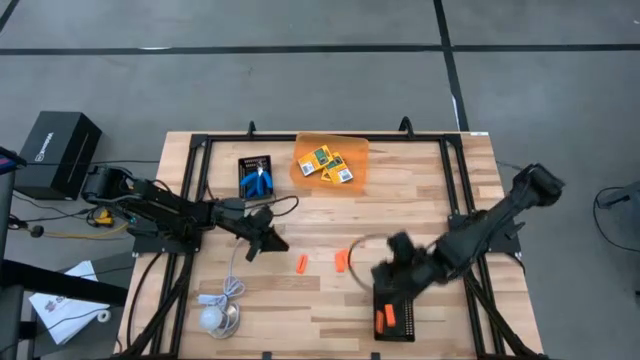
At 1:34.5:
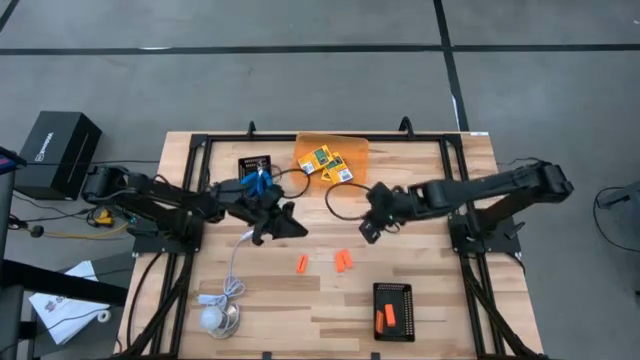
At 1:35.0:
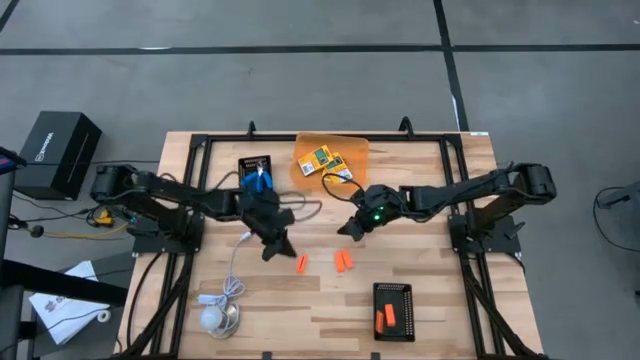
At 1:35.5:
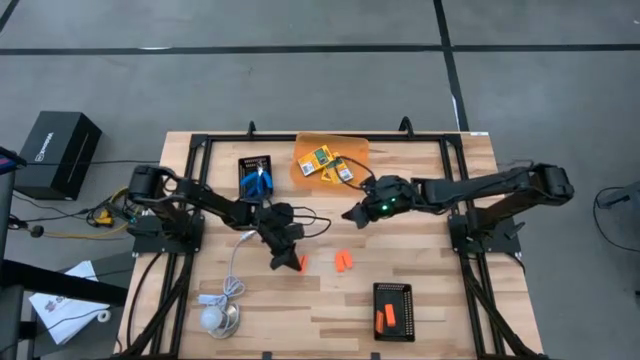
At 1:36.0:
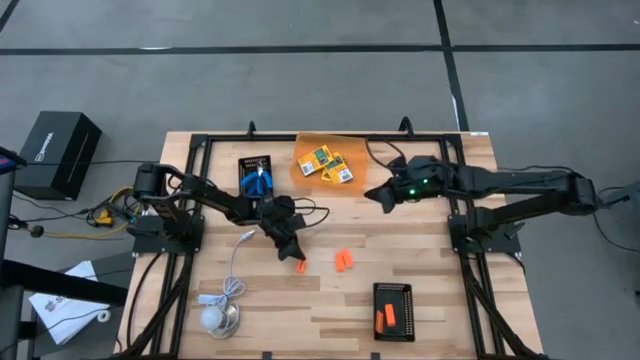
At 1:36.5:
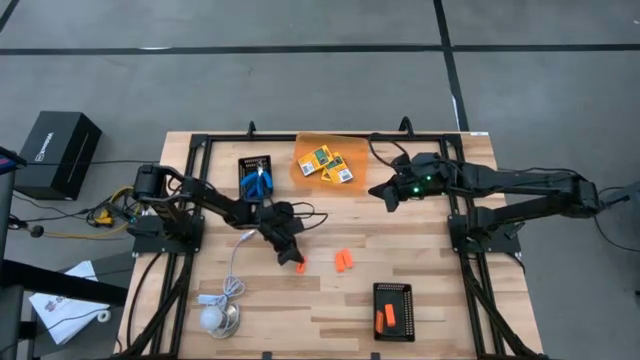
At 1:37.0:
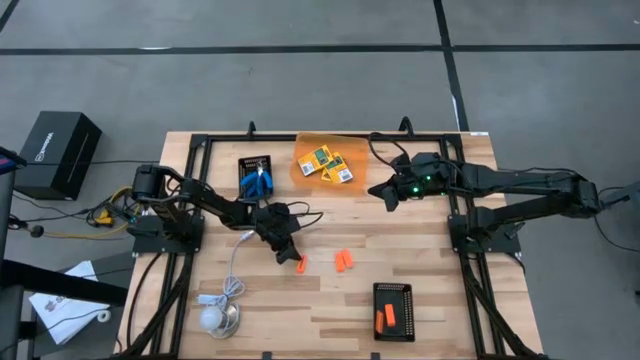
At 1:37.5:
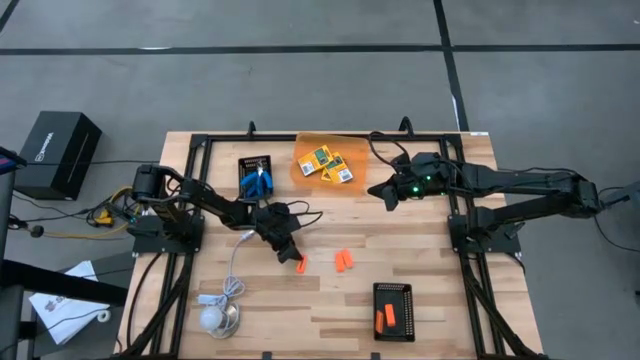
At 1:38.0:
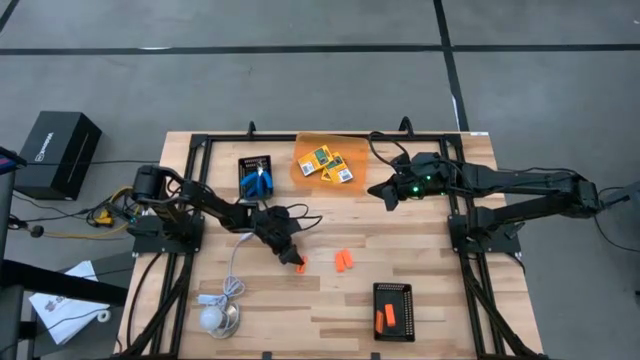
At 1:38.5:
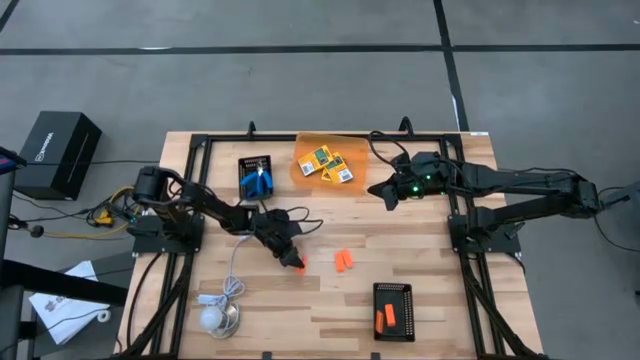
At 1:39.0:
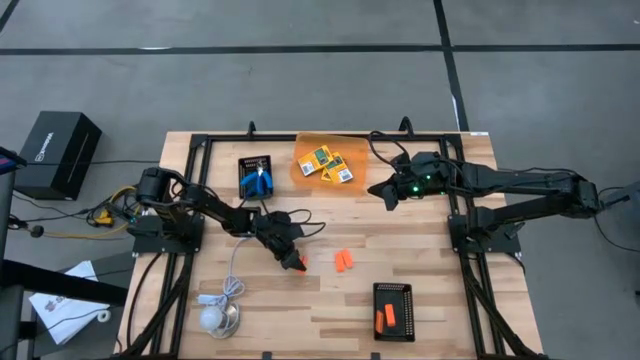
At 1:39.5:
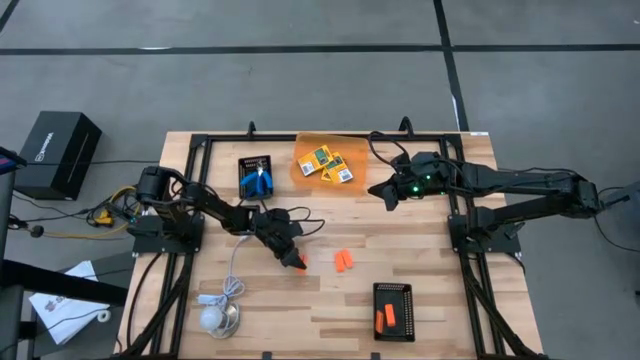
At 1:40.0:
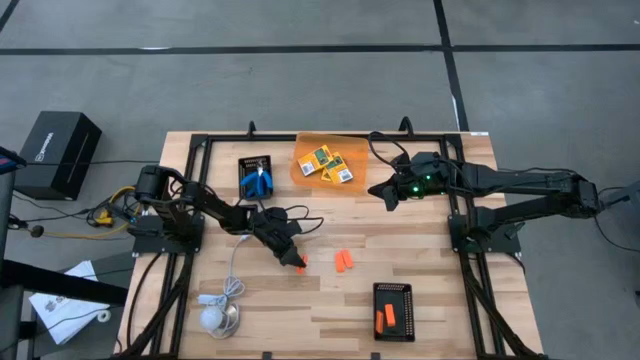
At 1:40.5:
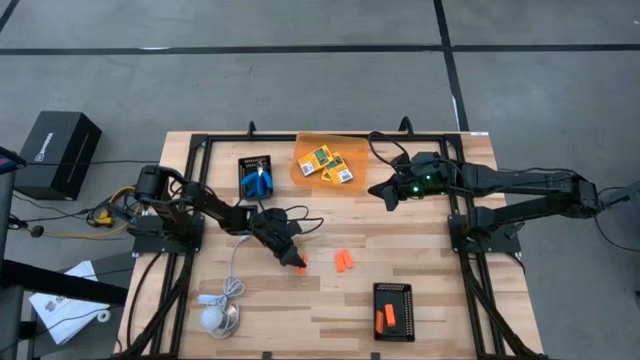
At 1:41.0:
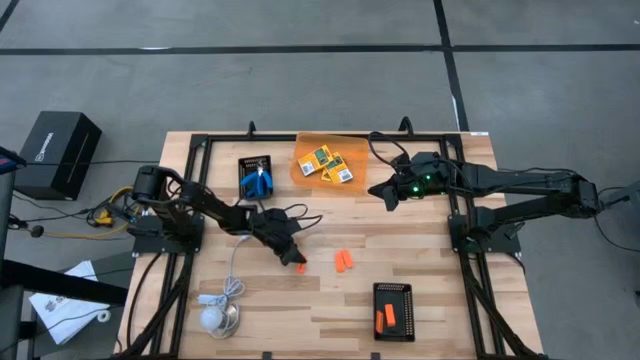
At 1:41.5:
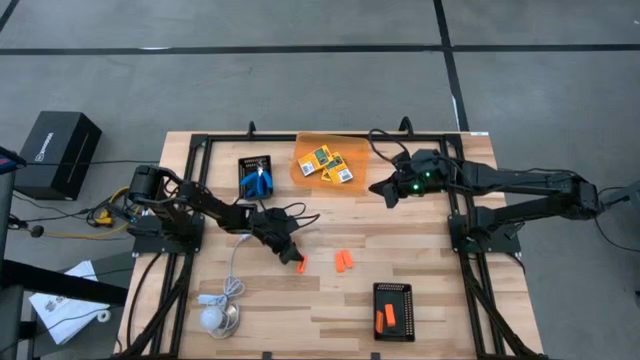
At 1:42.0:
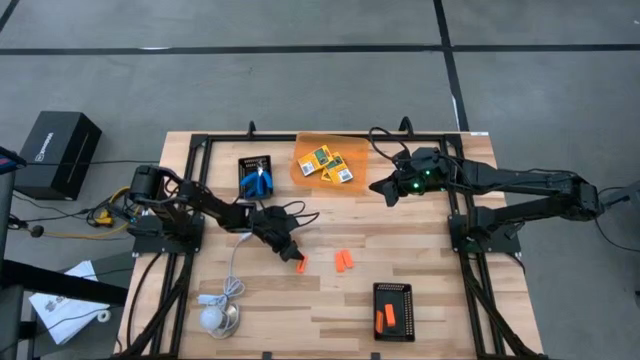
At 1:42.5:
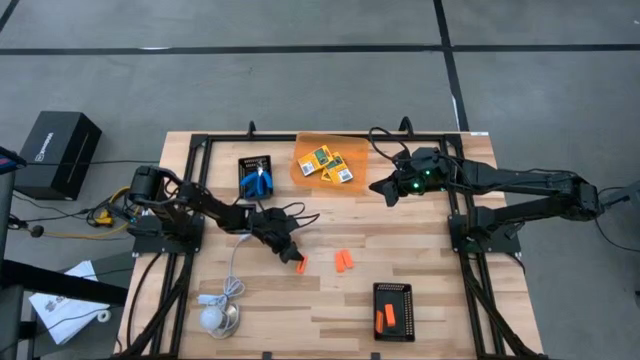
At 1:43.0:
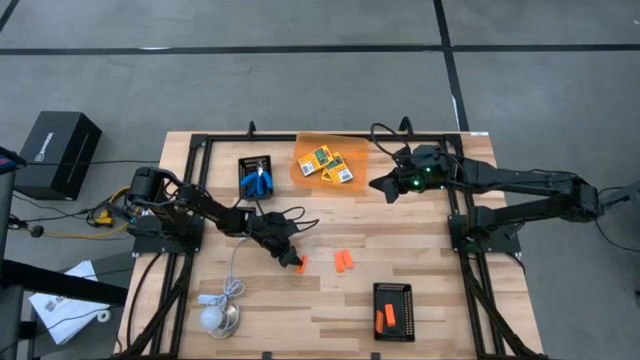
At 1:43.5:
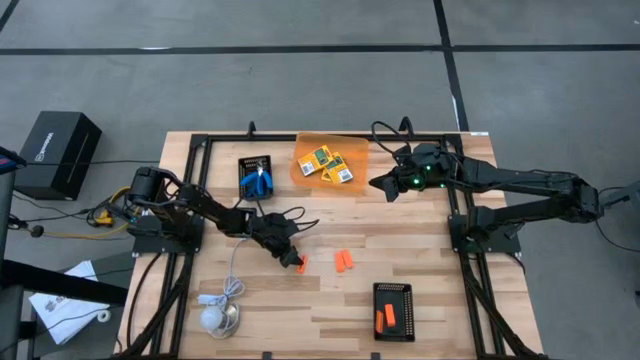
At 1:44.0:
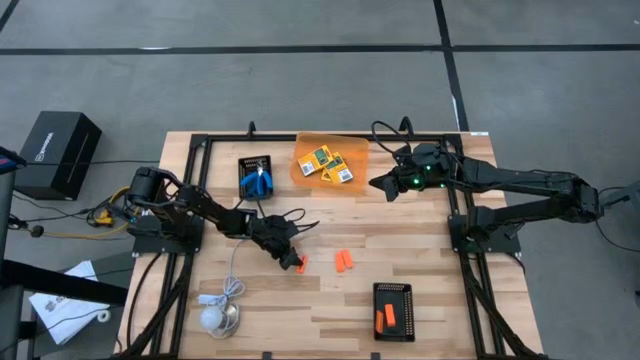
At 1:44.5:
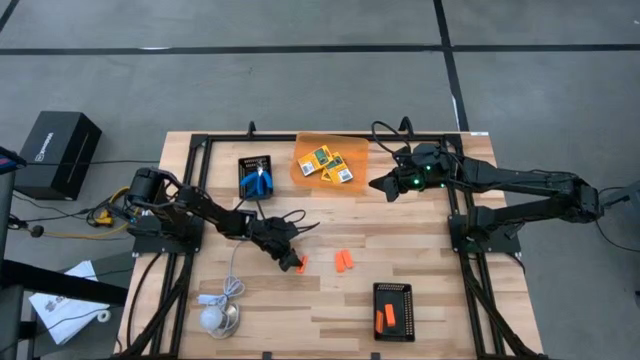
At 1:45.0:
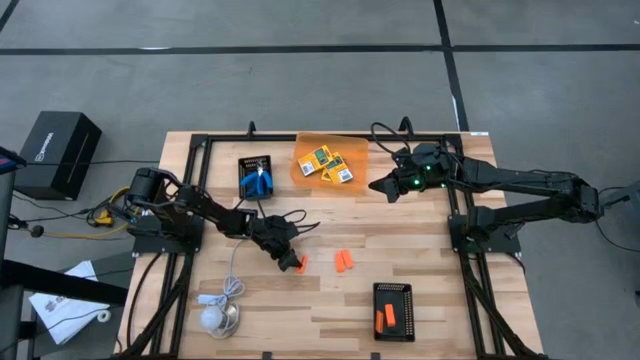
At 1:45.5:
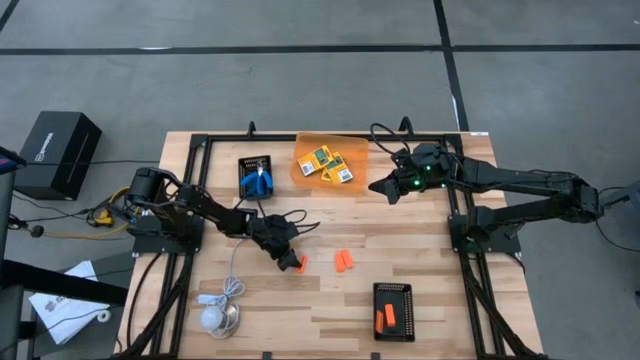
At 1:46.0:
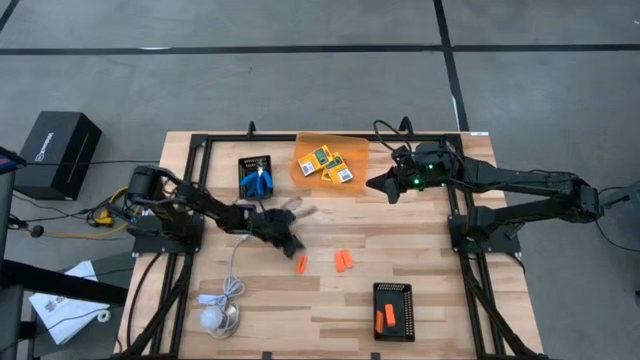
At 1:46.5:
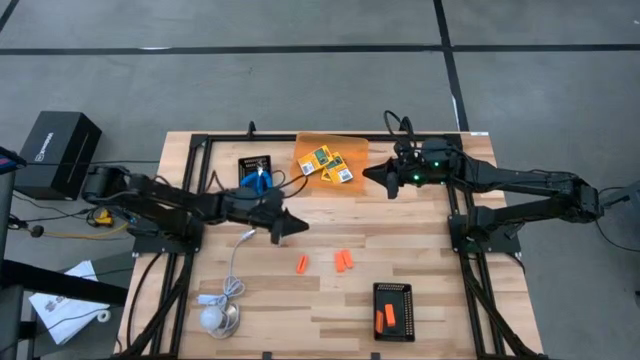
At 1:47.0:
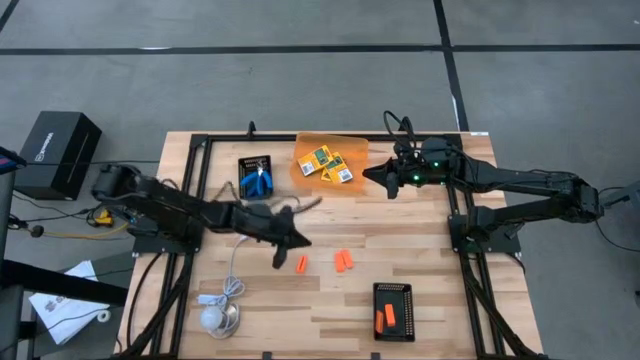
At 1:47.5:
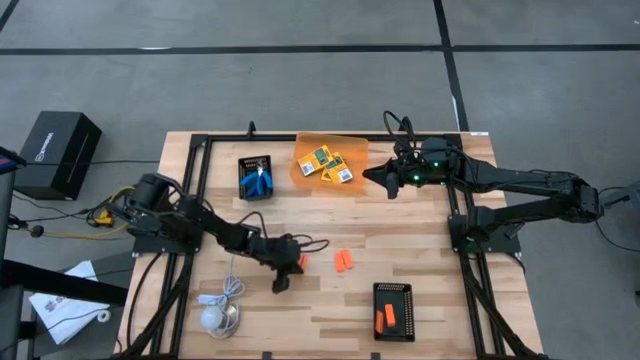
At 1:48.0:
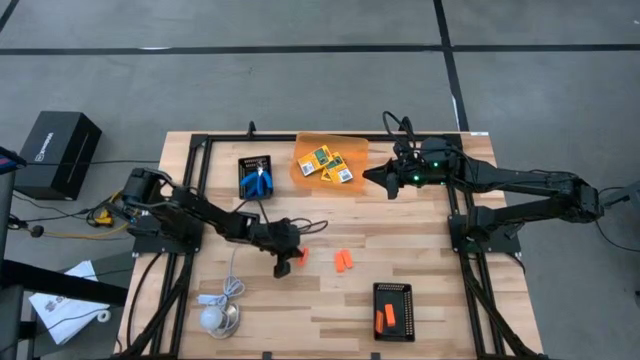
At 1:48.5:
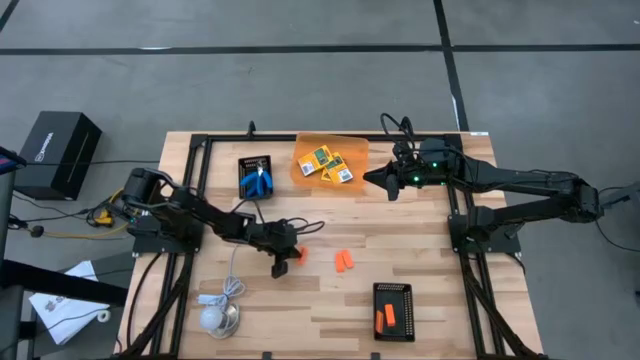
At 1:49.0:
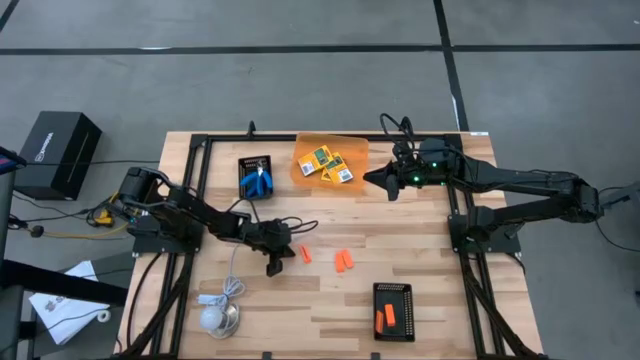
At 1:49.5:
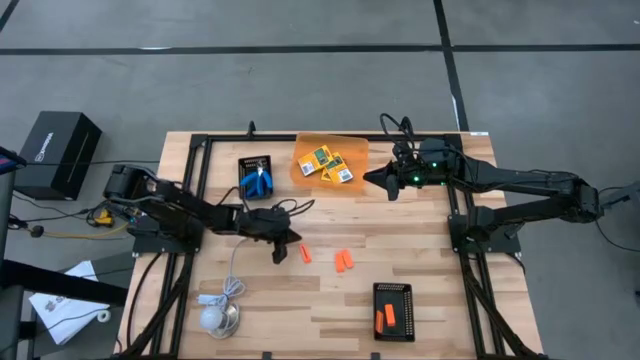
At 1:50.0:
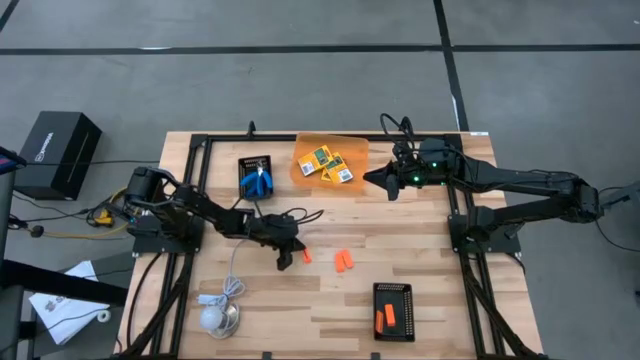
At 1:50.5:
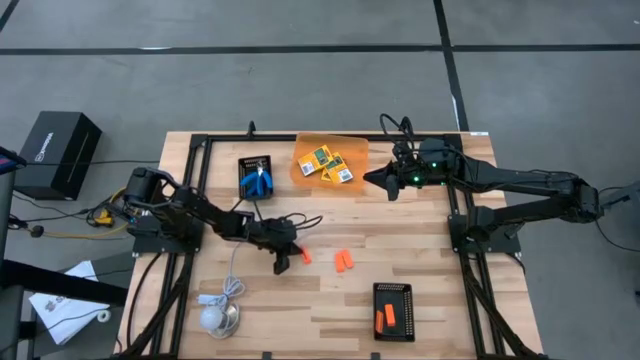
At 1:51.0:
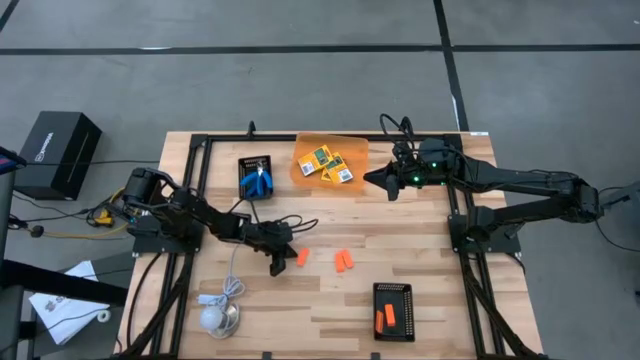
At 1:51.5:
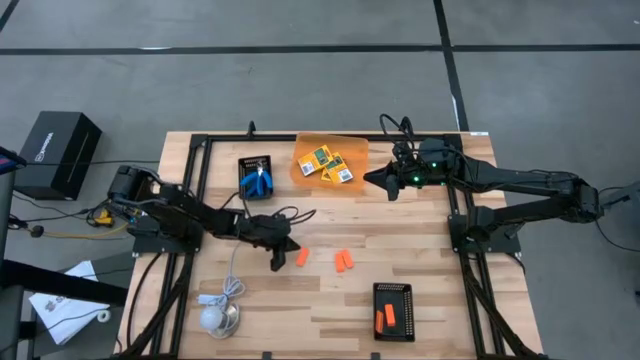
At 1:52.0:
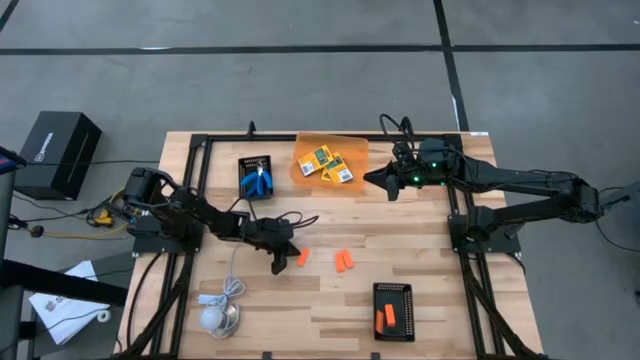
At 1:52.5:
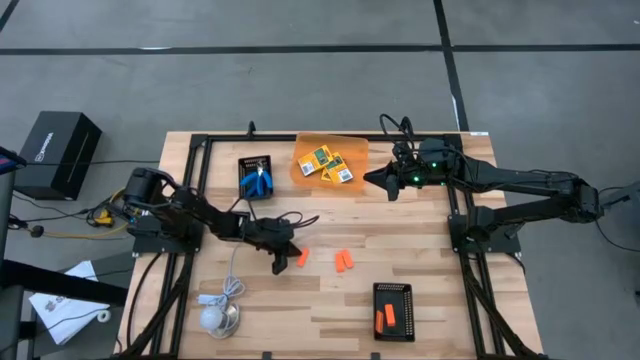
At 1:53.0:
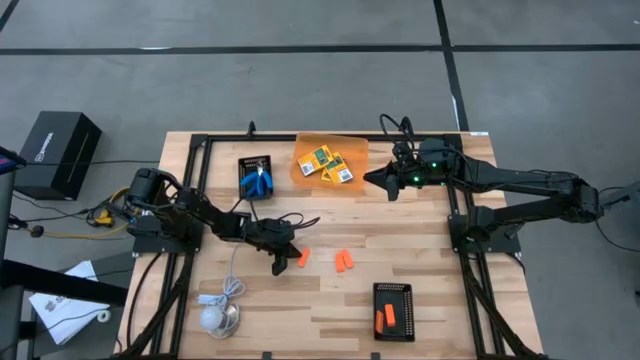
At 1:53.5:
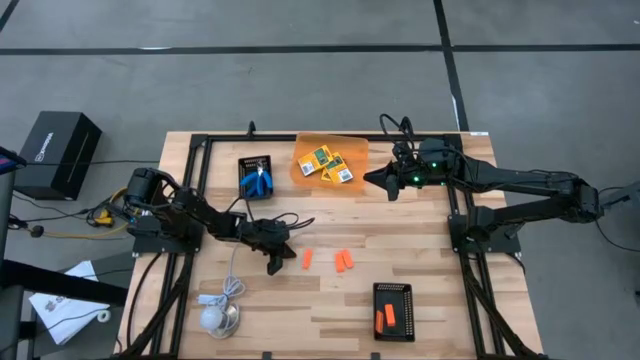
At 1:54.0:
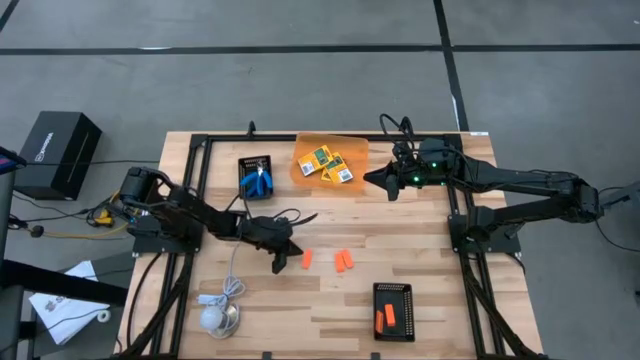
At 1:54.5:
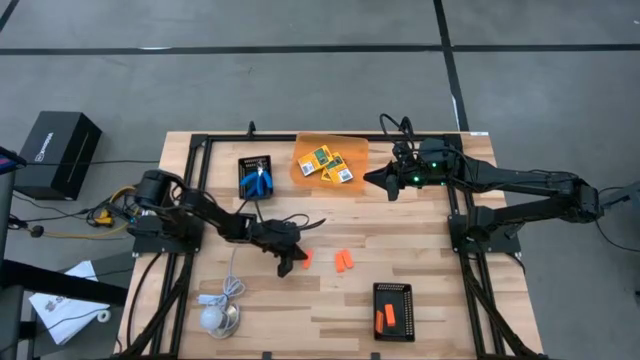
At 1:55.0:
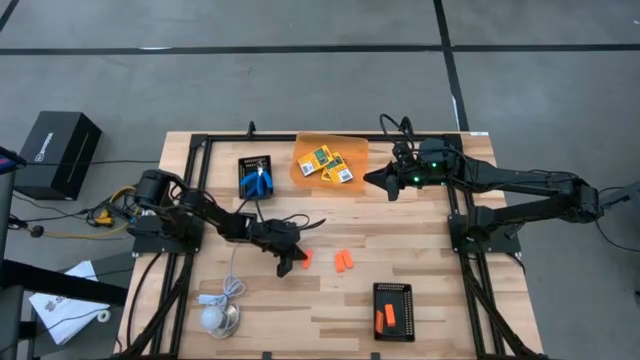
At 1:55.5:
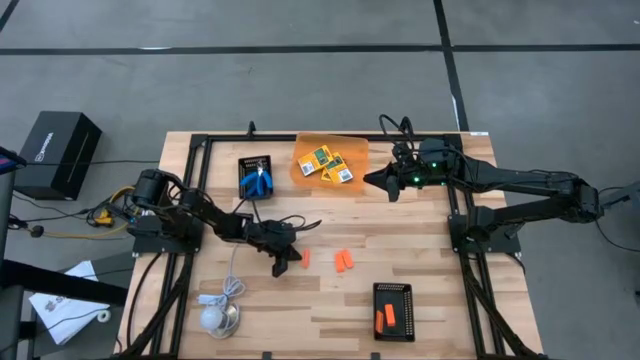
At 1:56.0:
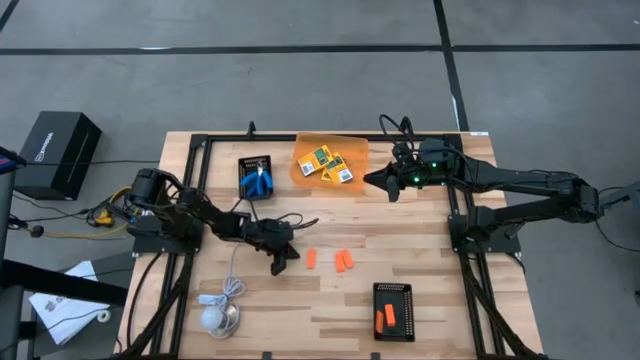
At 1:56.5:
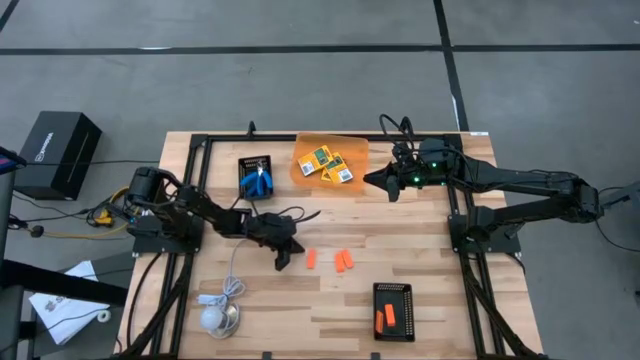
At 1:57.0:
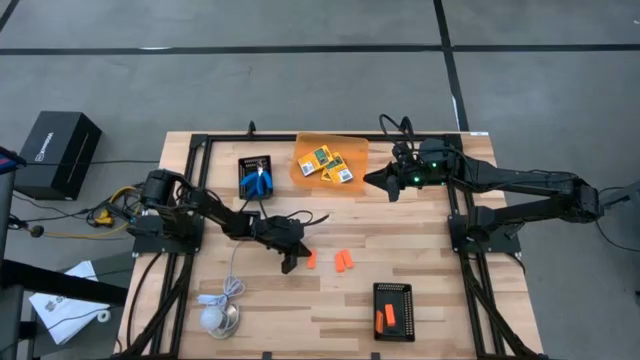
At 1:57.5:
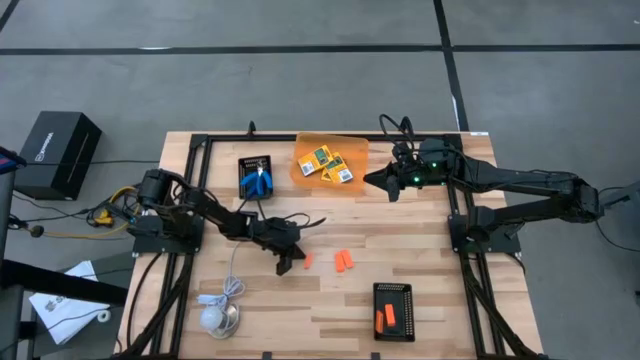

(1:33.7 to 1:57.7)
Task: Pick & Place School Supplies
Put the eraser into the bottom black bin
